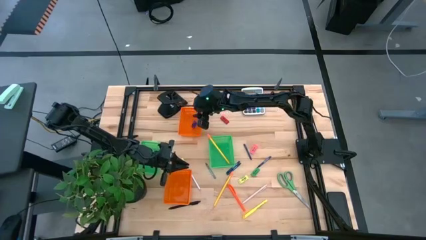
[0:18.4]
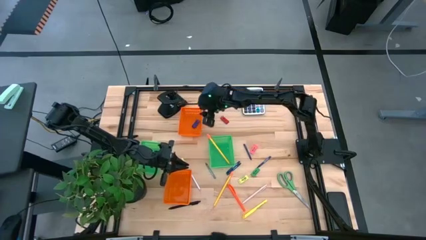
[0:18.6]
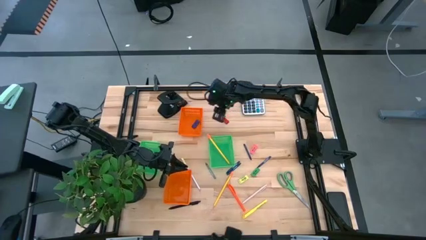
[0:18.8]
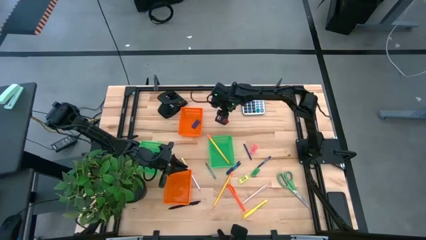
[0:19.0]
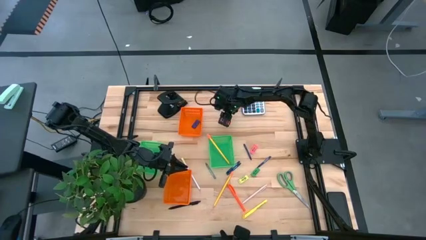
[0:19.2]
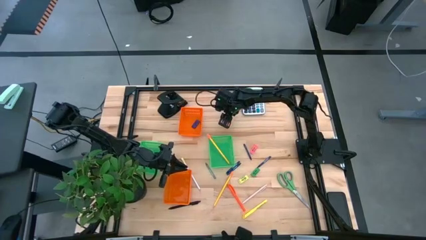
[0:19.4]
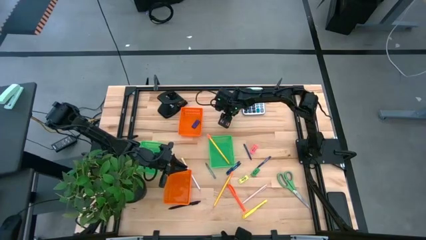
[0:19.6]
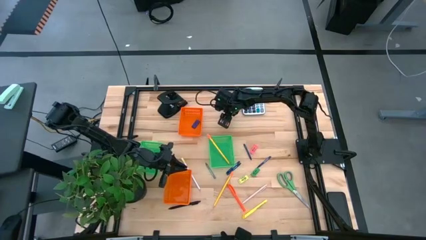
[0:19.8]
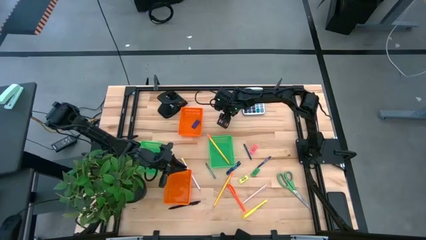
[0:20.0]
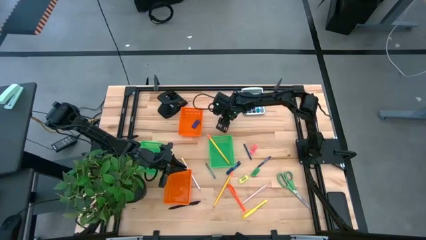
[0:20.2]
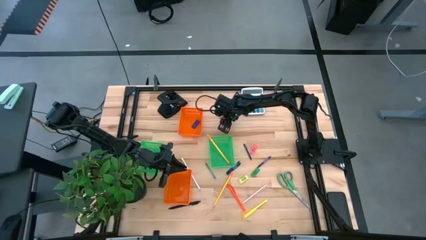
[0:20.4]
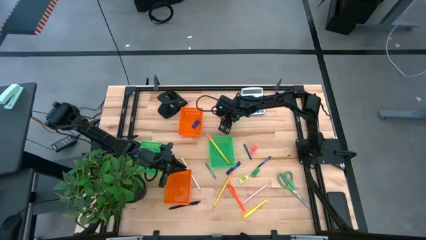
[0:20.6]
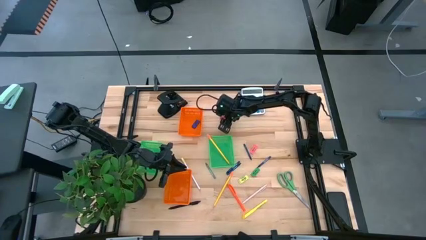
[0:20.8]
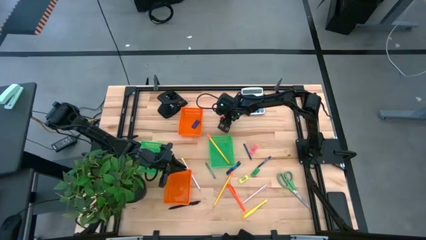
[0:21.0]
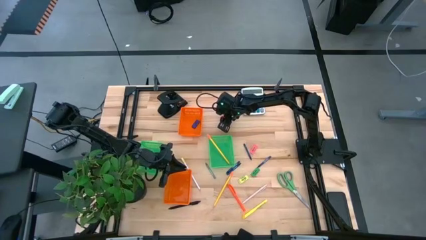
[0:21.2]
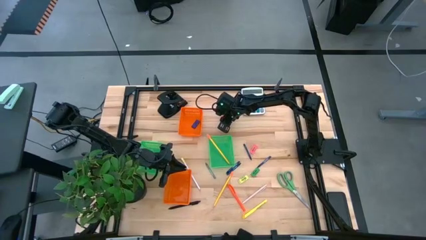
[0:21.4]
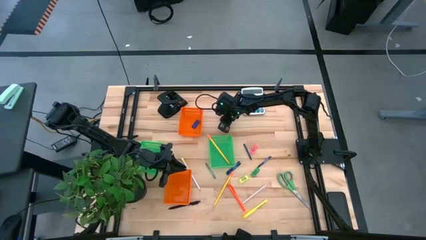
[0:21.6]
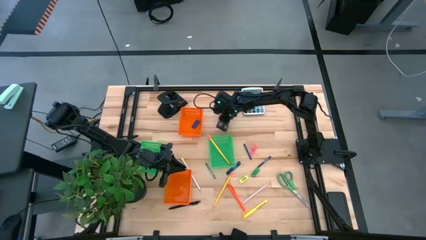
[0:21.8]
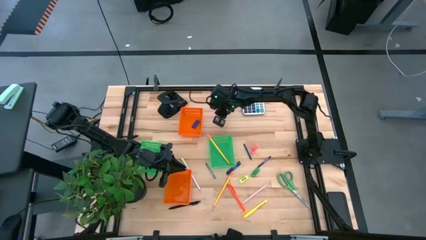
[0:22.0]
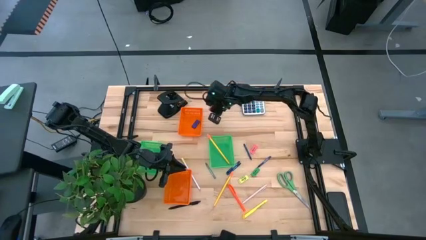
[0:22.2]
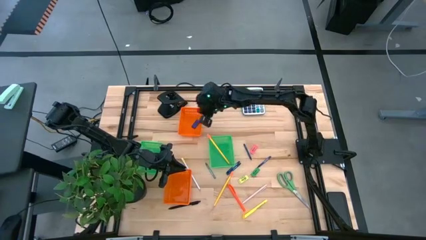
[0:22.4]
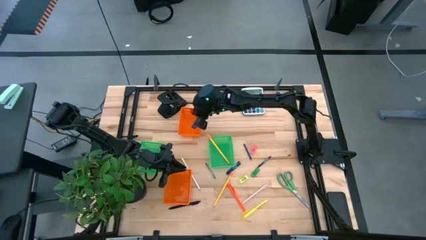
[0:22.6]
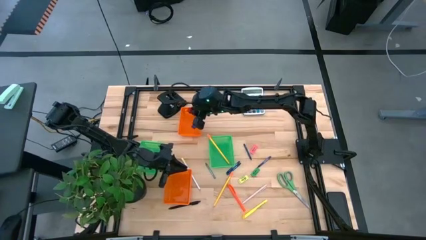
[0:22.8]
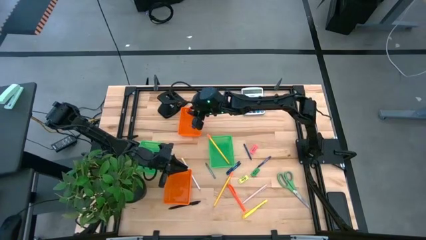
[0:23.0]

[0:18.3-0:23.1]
Task: Sort crayons/erasers/pens/pencils in bins
Put the red eraser into the top orange basket

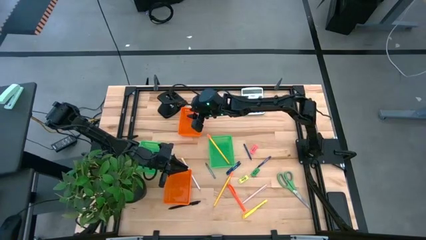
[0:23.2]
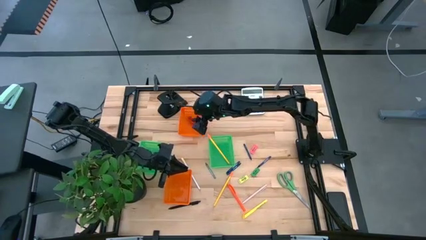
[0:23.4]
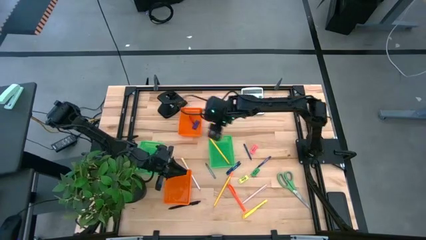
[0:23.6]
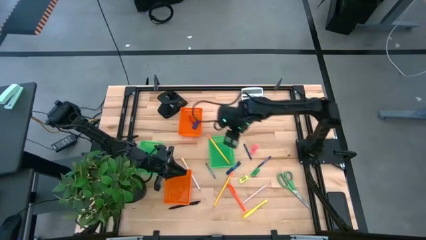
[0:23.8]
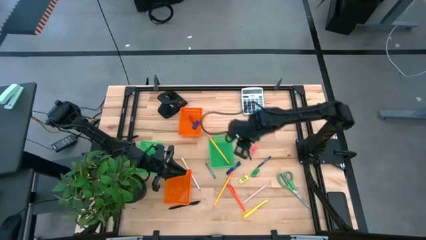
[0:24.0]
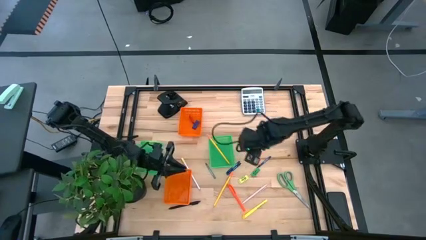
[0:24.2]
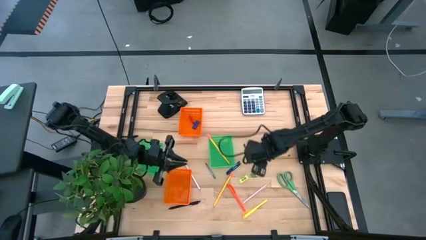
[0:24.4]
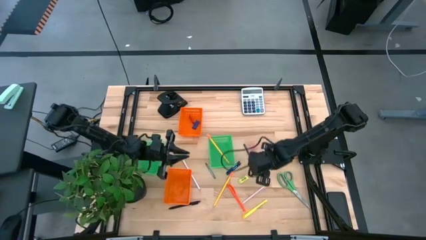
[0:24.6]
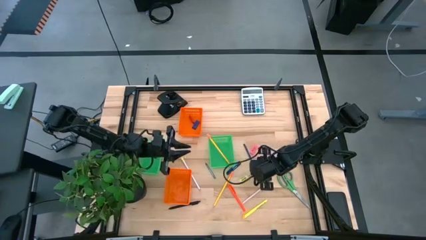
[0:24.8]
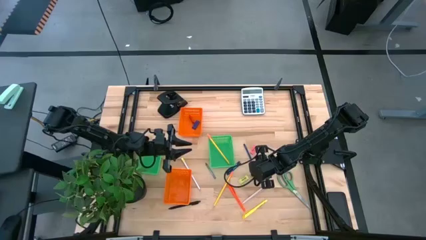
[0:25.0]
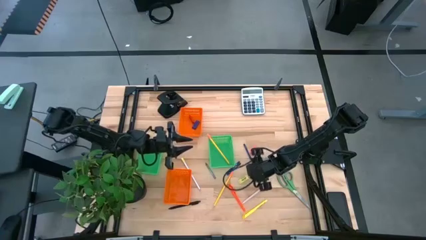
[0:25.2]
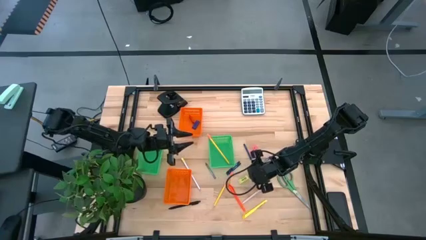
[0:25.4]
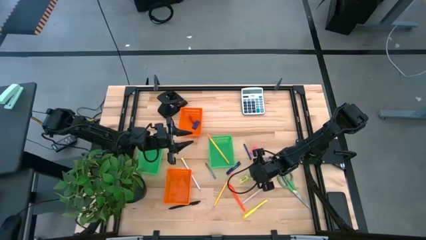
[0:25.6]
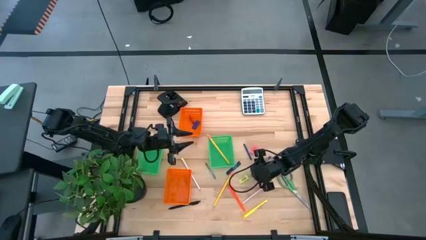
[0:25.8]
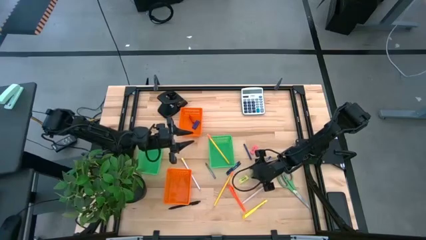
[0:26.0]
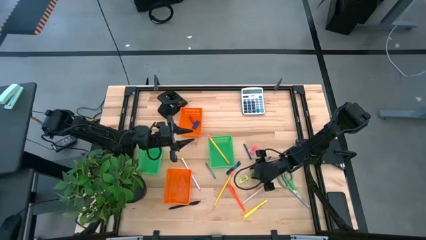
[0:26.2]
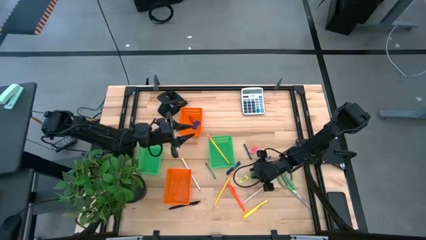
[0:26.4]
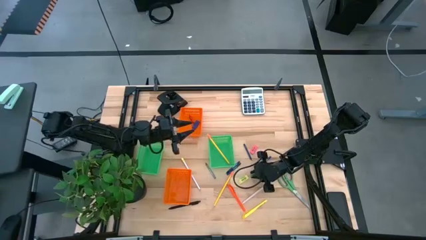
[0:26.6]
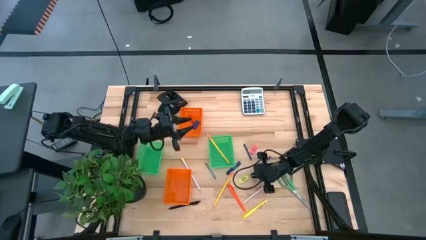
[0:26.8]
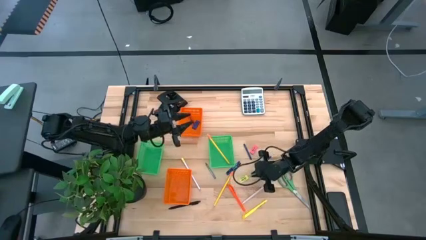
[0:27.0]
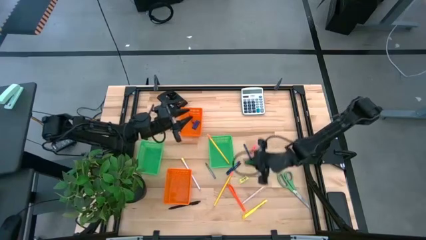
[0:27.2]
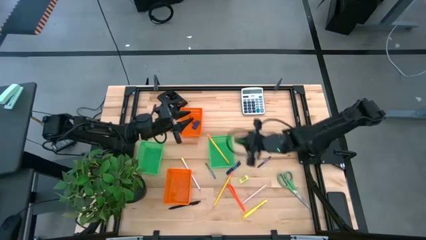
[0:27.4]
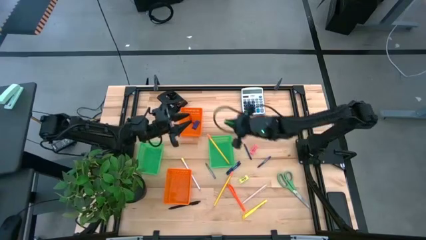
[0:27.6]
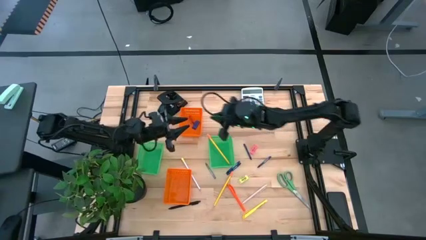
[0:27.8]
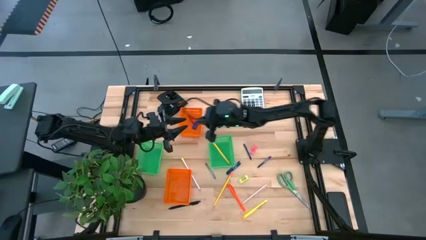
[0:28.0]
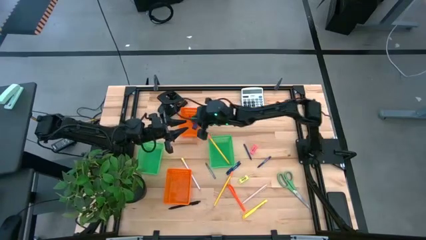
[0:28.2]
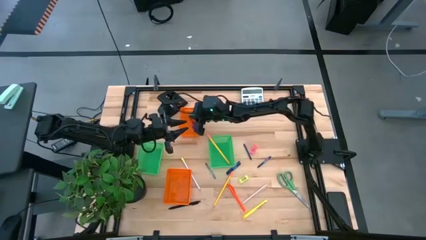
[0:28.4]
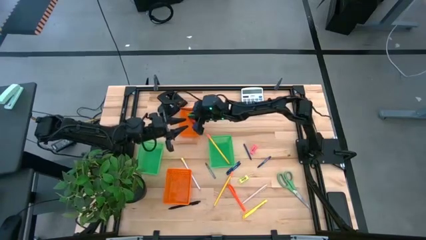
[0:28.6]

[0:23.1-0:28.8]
Put the green eraser into the top orange basket

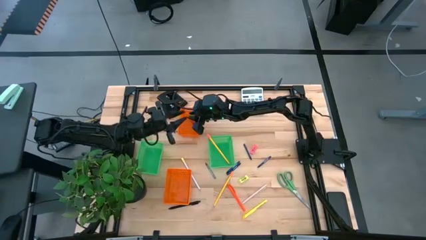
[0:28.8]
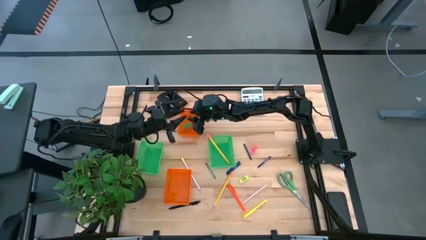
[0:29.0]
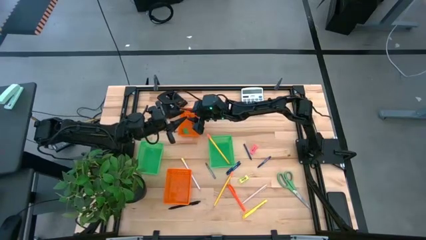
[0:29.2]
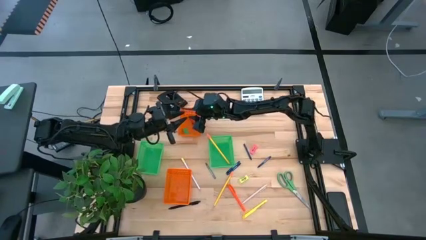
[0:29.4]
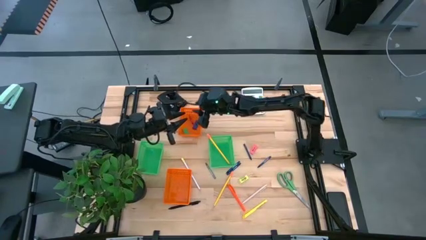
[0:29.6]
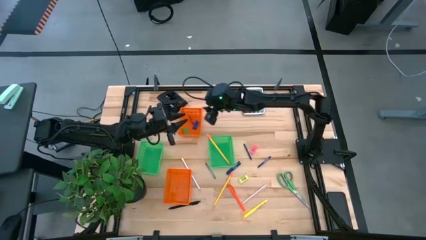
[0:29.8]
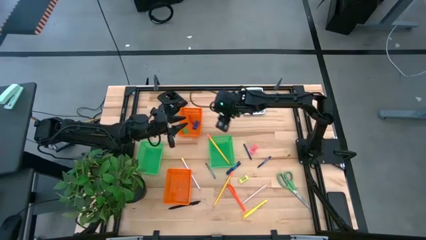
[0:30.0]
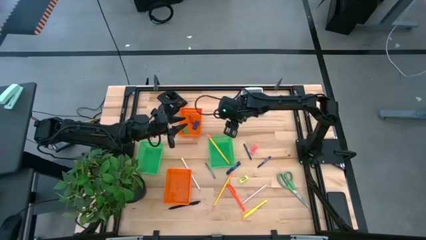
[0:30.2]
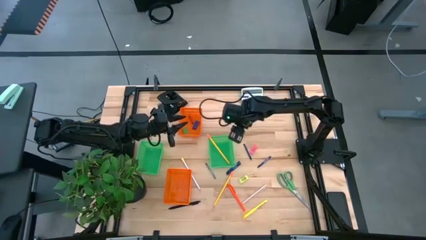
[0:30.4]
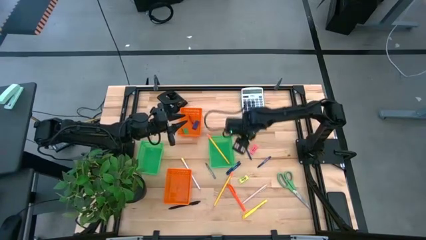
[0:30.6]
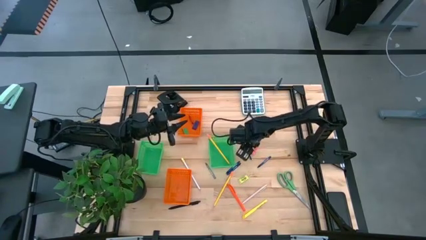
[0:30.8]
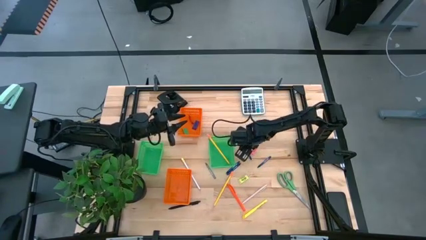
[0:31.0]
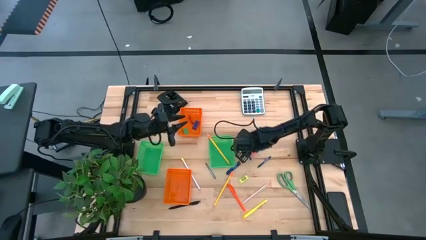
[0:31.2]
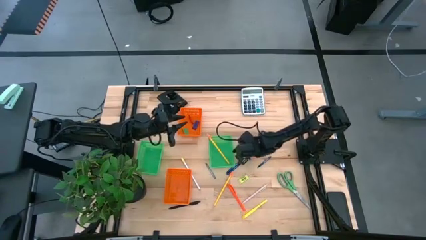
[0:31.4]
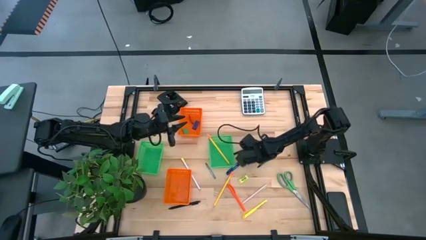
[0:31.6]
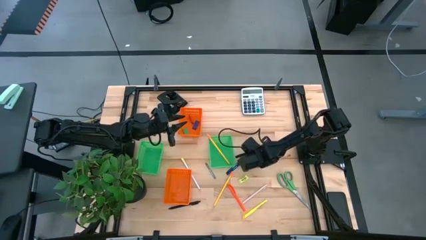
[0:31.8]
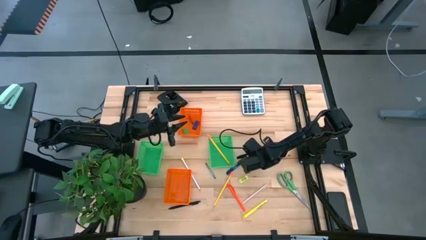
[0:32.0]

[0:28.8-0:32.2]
Put the blue crayon into the bottom orange basket

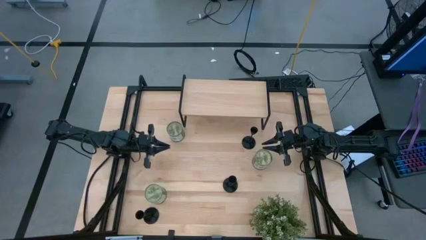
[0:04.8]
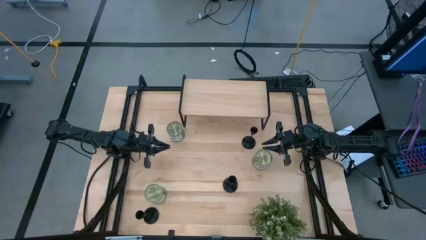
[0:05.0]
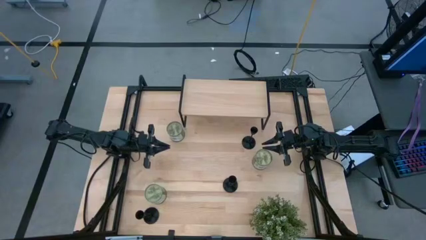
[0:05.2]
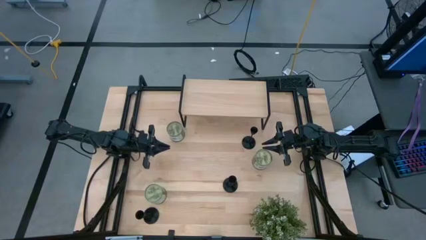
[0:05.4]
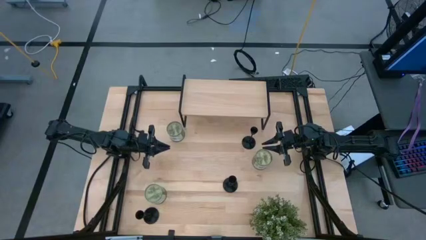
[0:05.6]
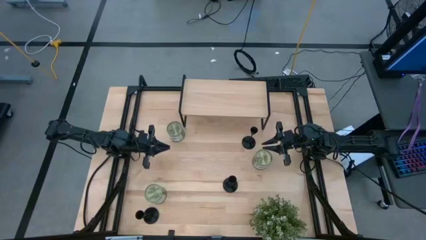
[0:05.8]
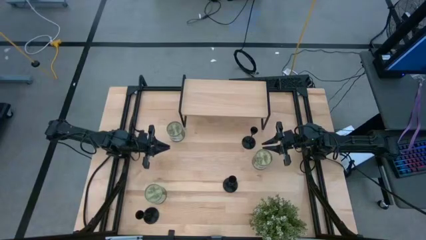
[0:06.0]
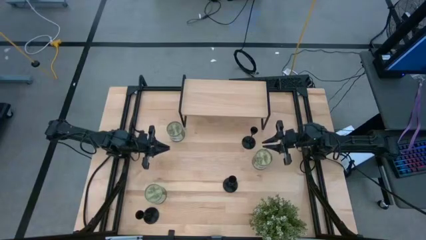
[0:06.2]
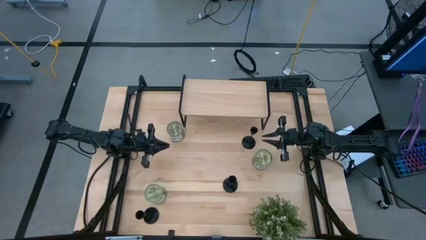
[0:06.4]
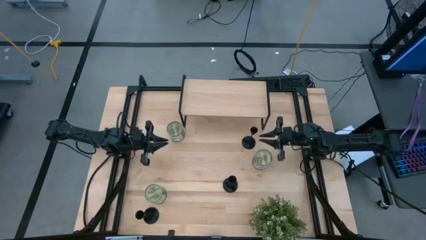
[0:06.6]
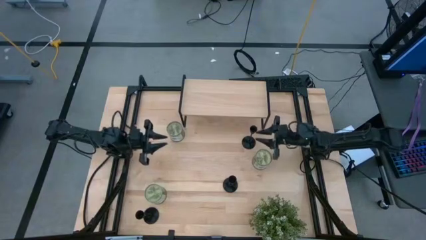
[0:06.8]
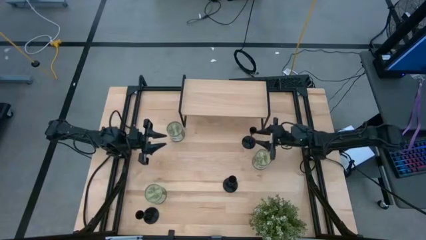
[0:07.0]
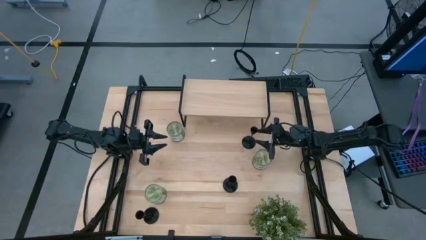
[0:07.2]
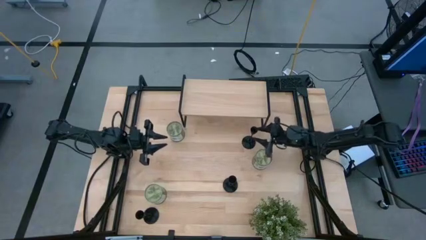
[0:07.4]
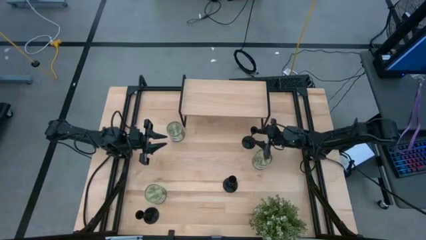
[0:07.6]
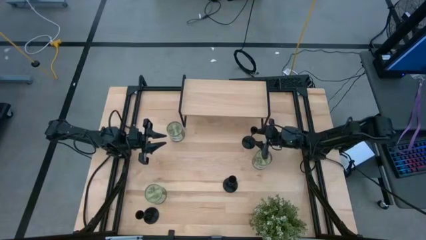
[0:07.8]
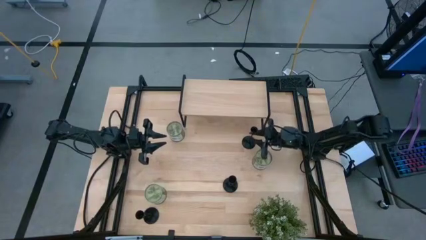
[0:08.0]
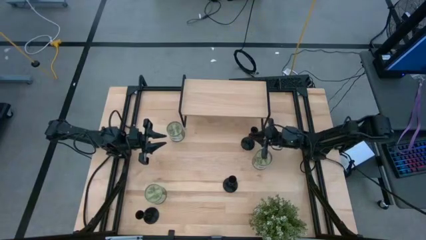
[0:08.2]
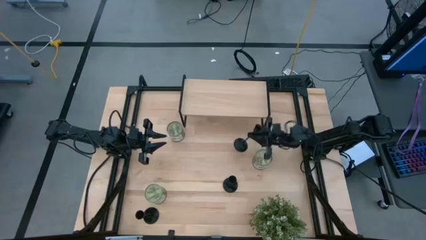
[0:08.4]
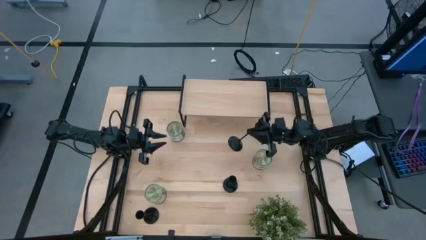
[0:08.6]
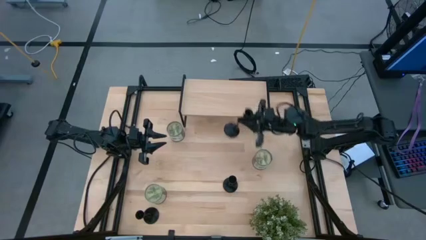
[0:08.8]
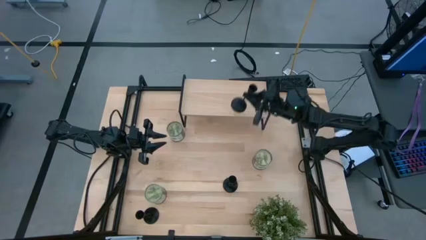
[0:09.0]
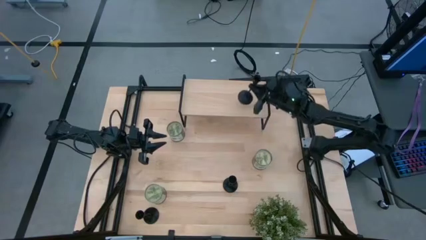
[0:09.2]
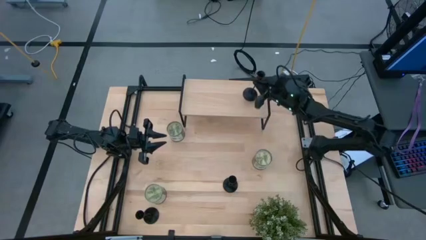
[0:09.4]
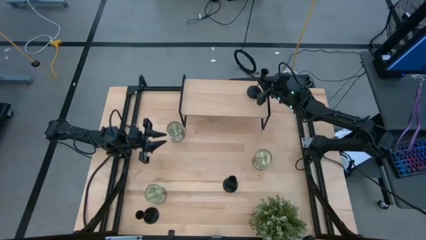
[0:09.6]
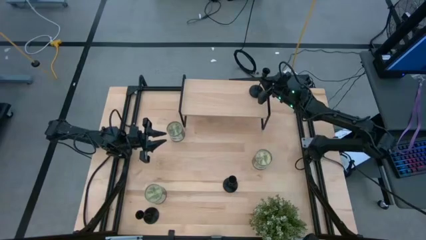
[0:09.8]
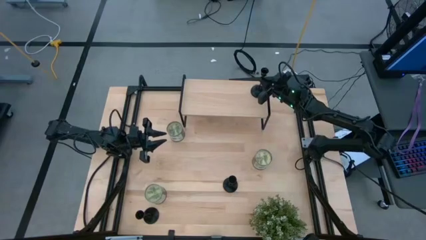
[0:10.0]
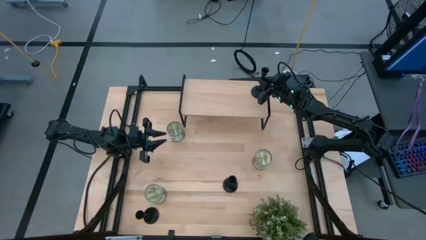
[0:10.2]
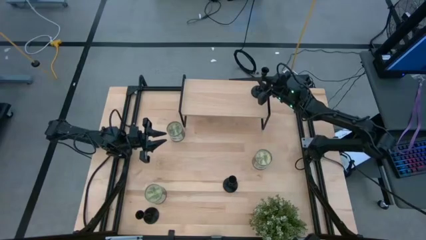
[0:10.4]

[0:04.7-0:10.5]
Task: Pick & Place candle stick holders
Put the top candle holder on the shelf
